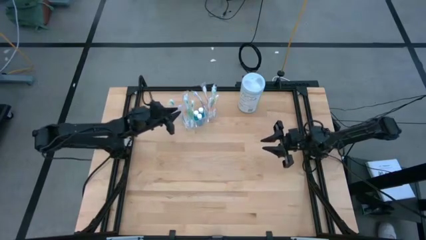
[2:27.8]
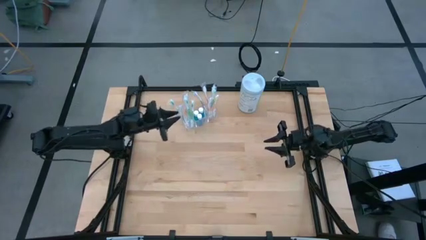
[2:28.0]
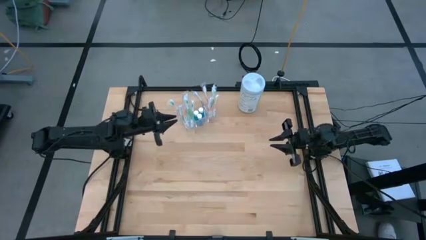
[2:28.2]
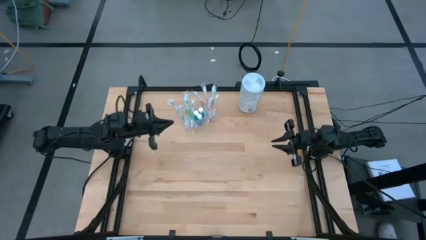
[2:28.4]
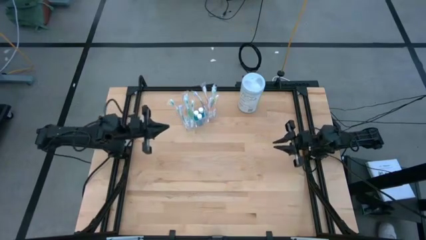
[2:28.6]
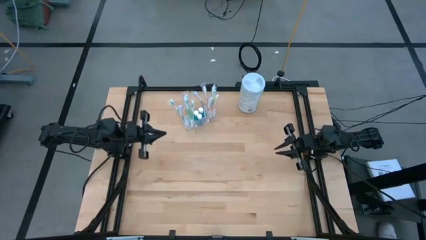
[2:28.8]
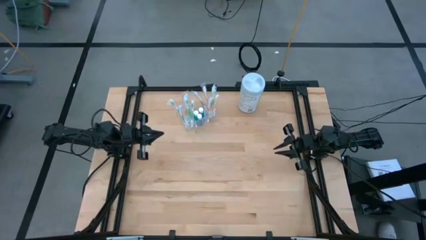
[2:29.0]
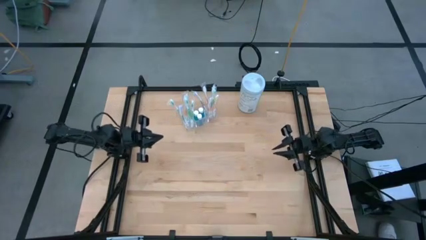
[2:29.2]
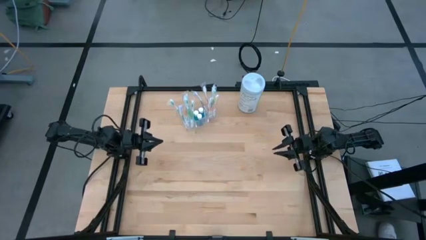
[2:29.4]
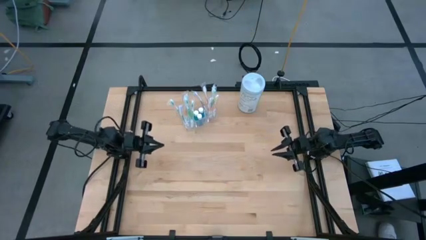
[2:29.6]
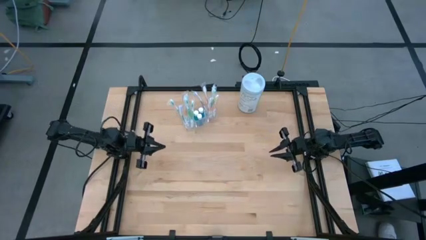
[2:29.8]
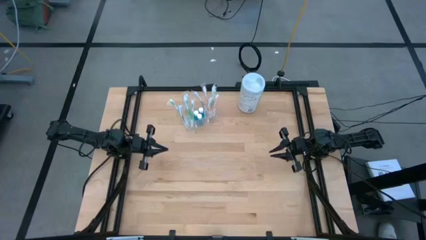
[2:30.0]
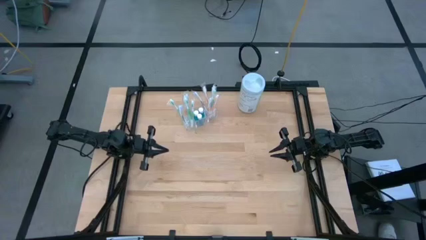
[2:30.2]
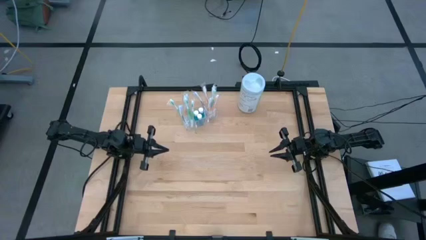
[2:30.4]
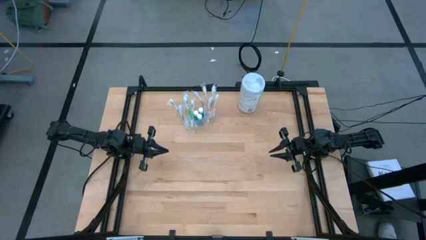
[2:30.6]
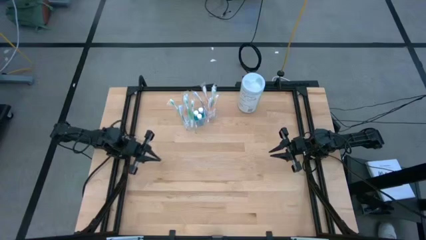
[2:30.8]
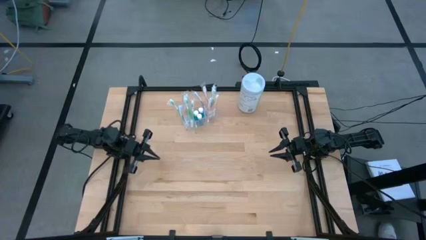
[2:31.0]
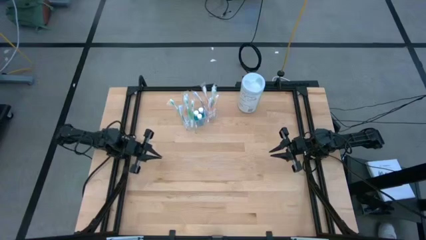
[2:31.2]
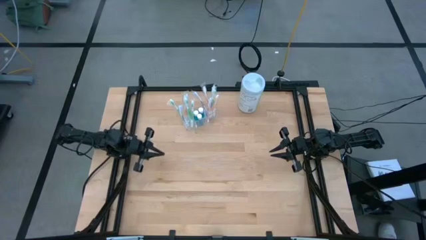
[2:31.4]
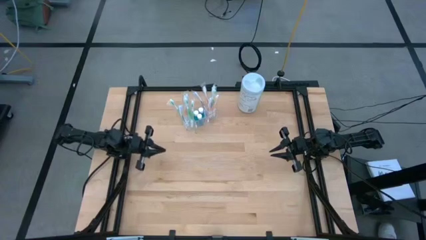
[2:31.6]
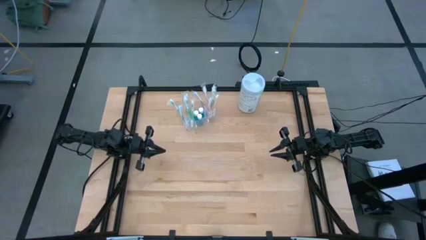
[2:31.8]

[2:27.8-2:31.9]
Task: Pick & Place toothbrushing station
Return to Home Position

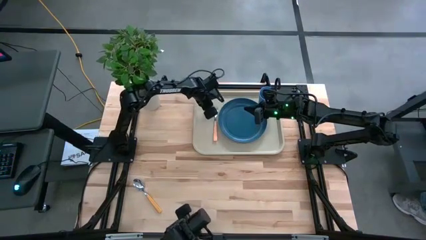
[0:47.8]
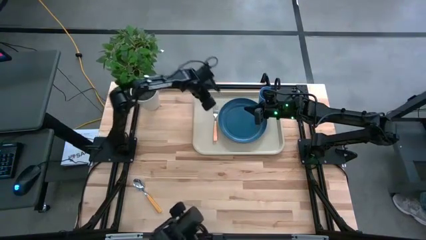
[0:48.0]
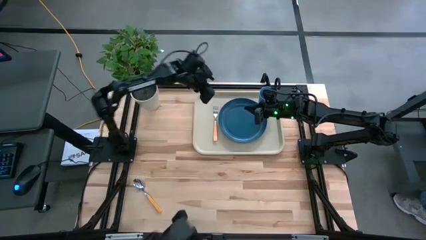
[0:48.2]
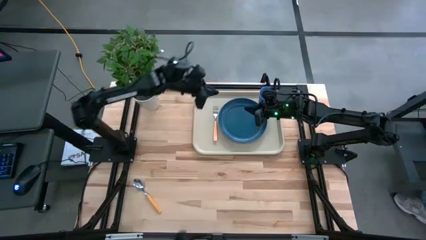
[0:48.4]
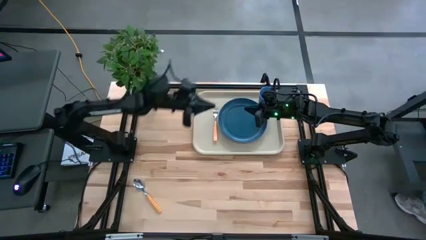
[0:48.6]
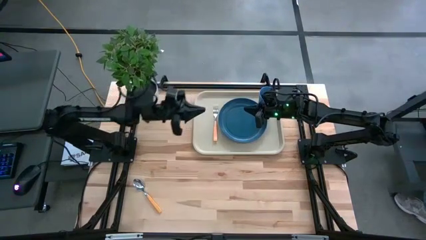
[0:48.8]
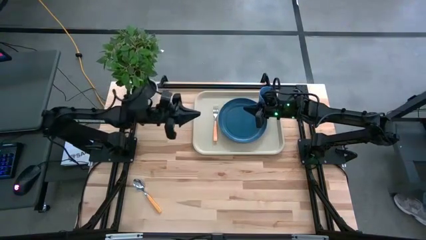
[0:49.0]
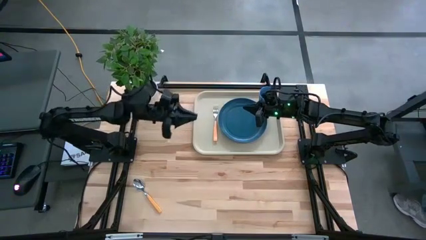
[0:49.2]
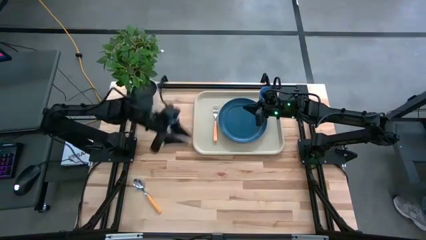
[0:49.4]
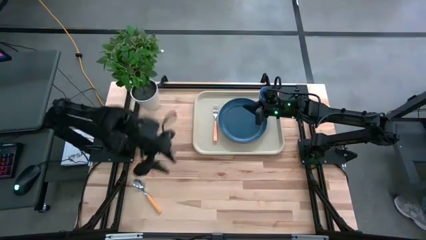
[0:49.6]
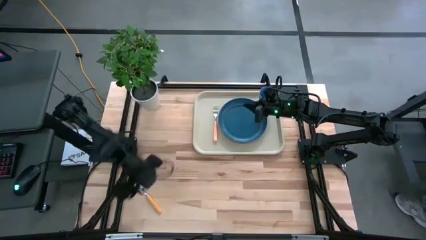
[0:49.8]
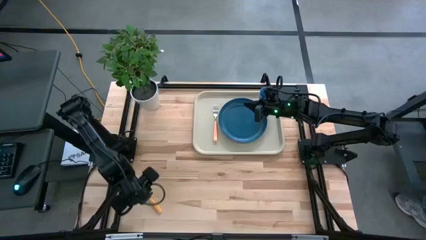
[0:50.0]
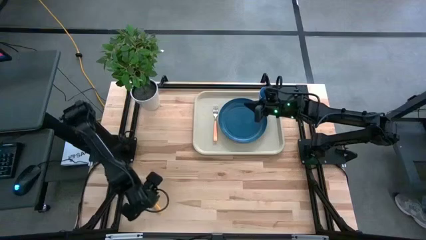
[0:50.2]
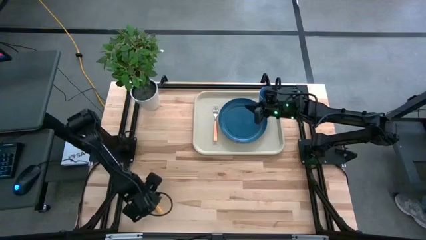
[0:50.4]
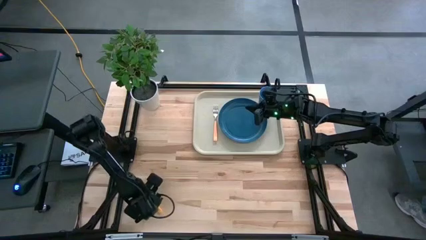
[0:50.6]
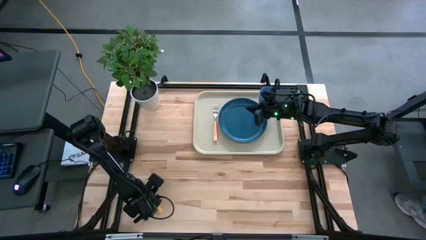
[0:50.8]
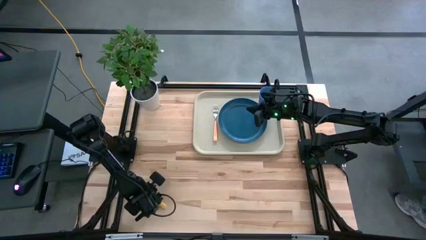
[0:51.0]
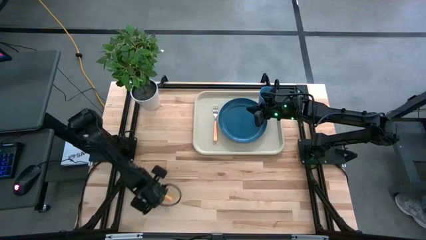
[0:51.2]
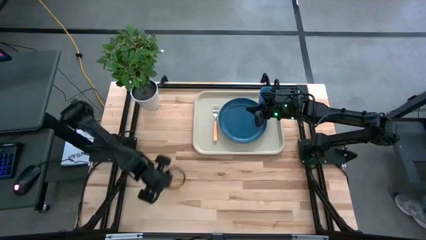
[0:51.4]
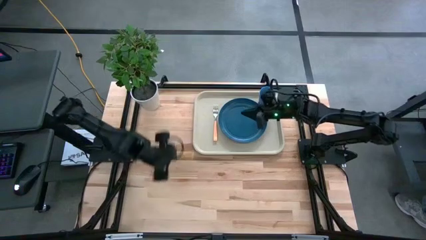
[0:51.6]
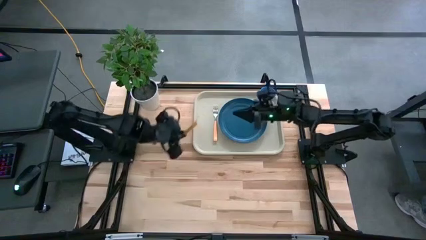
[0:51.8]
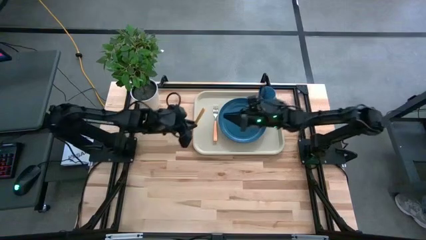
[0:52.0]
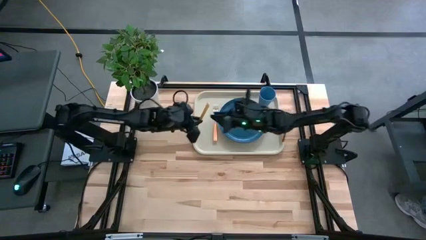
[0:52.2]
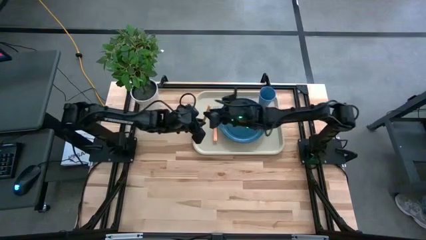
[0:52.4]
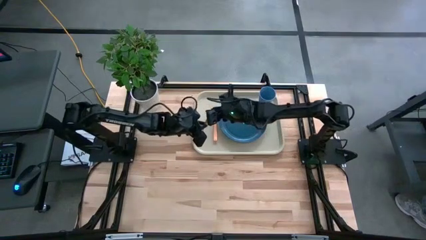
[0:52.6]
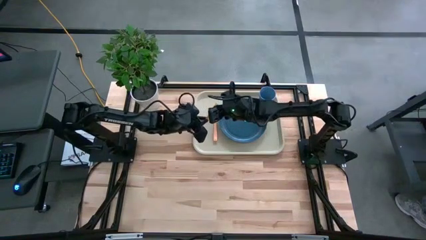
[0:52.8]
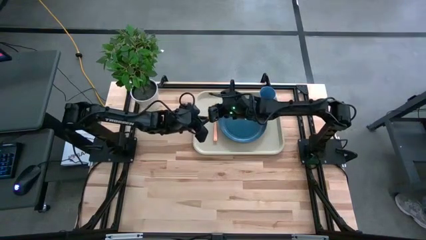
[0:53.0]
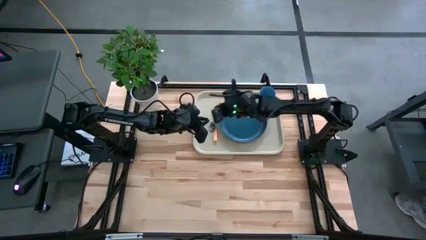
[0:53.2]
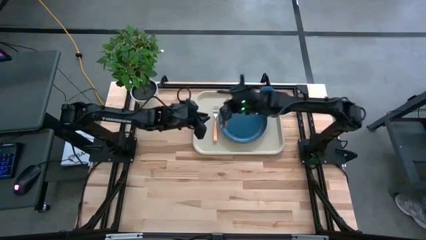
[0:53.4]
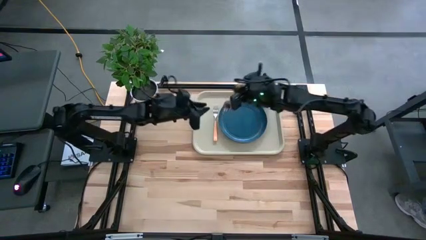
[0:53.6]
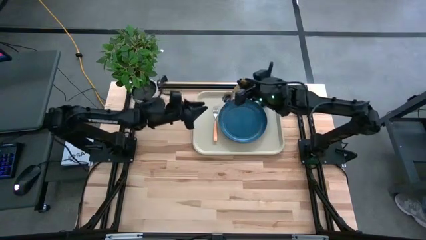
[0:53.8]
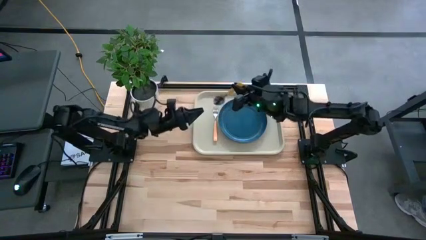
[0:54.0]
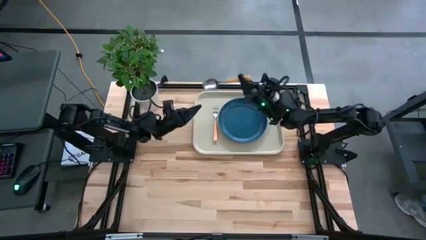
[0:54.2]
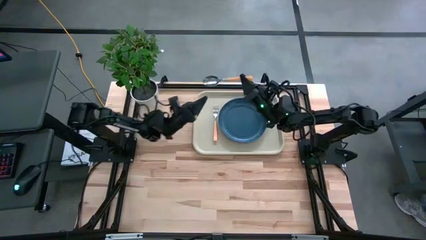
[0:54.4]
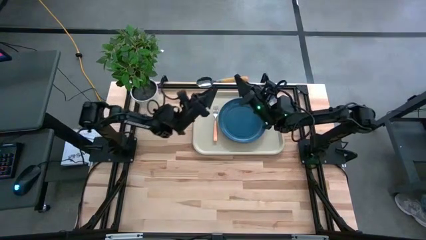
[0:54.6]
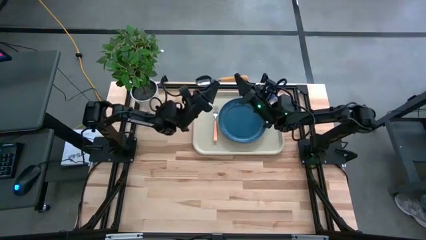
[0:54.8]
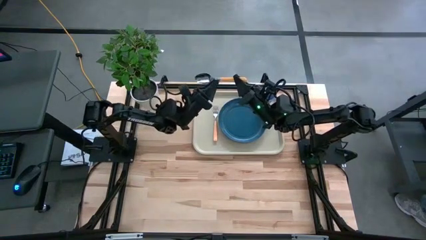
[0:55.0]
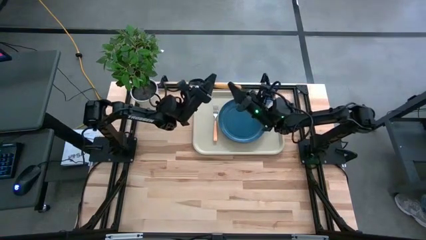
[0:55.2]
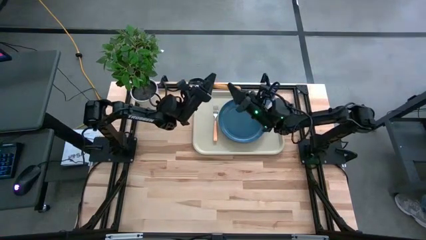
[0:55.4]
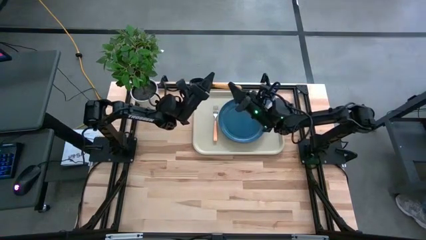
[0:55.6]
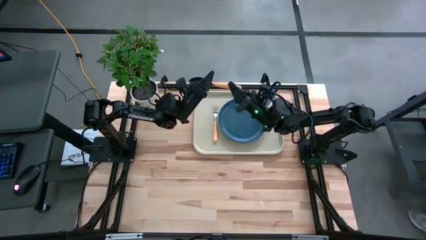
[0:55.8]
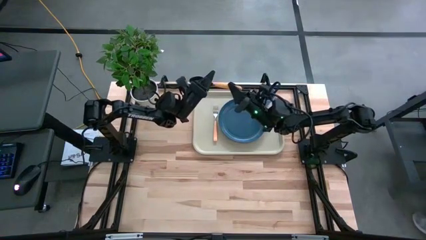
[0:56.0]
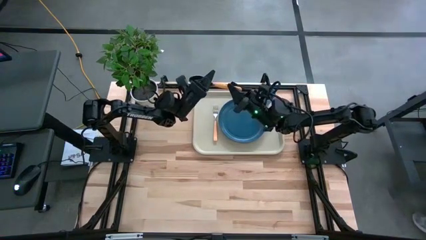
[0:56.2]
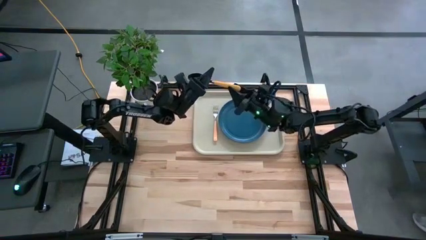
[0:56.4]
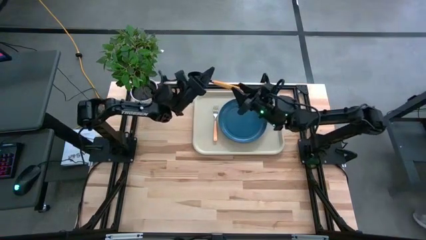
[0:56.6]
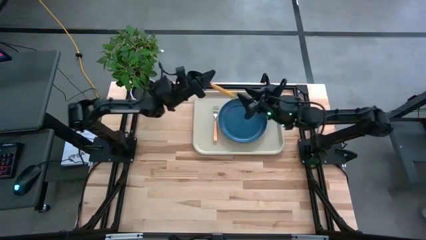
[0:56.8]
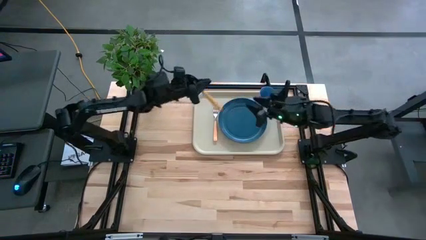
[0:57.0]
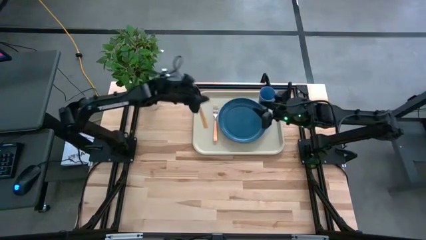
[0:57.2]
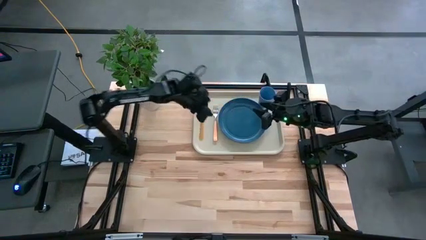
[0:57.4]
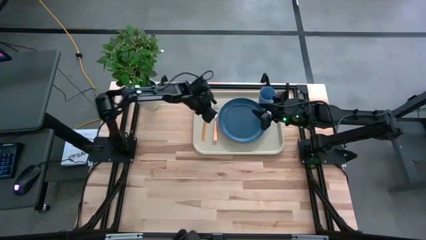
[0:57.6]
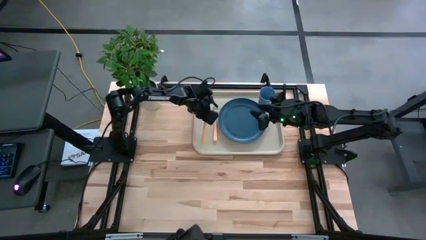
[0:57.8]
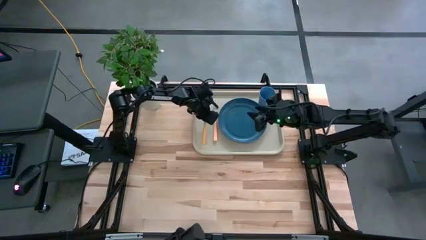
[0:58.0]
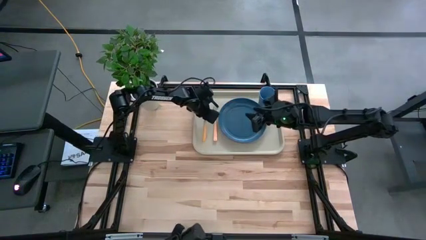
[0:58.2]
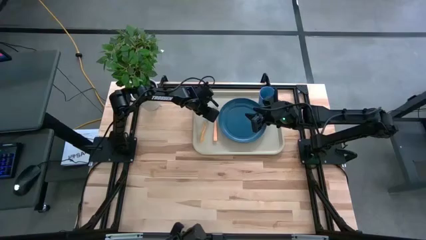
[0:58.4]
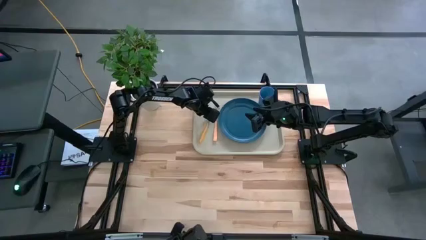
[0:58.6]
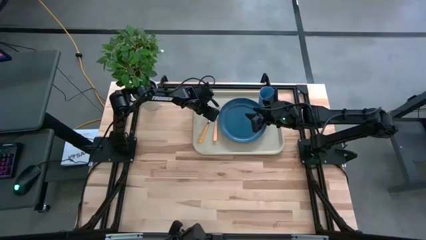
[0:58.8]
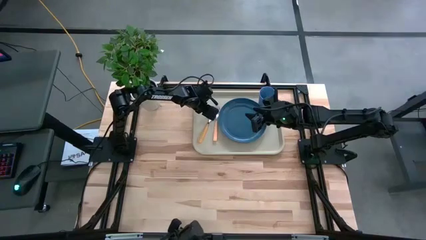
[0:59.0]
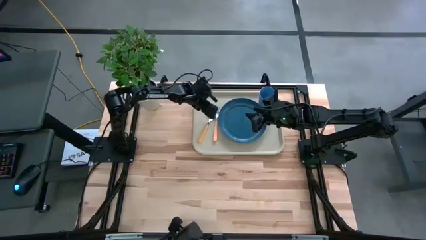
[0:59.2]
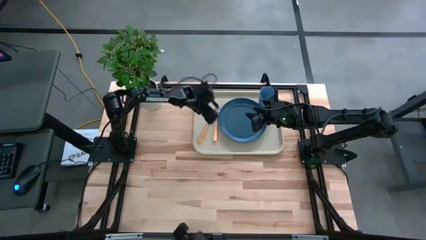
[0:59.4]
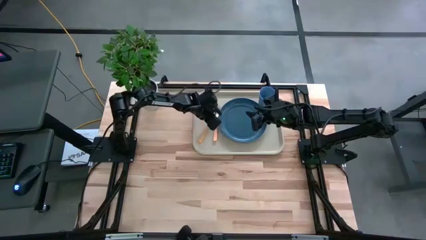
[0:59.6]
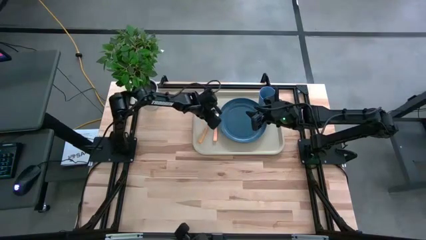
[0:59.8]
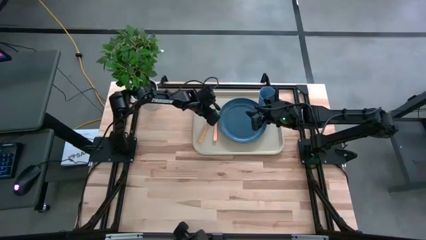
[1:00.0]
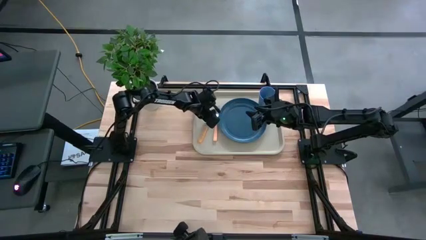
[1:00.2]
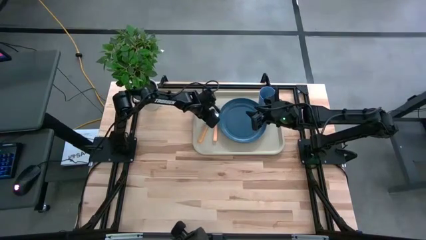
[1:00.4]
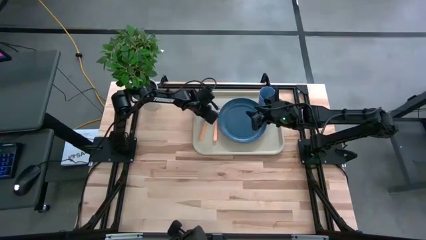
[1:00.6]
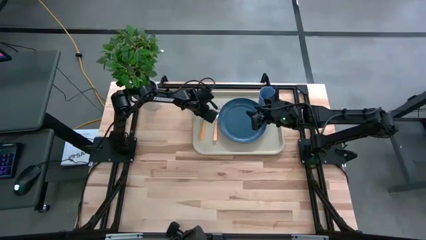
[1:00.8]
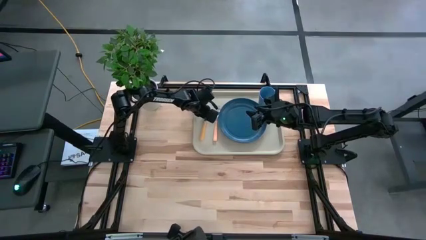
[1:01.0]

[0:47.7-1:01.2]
Task: Pick and place plate/cup/fork/spoon on tray
Put the brown spoon on the gray serving tray to the left of the brown fork
